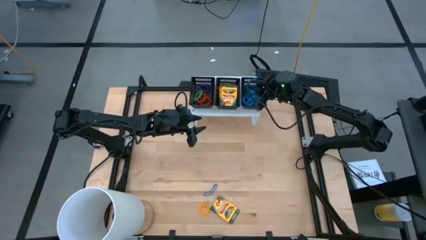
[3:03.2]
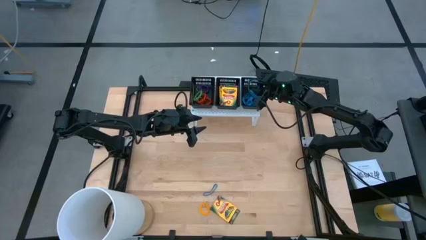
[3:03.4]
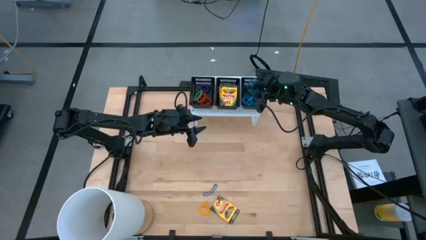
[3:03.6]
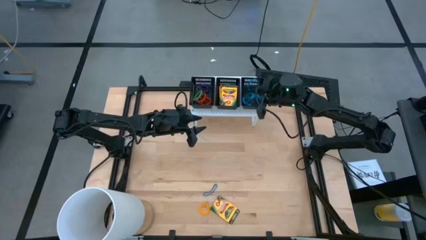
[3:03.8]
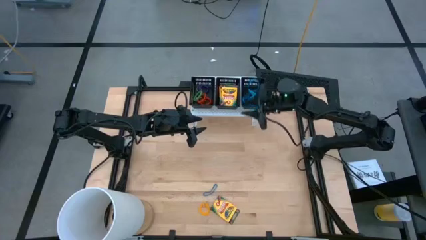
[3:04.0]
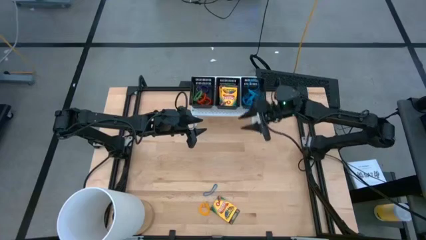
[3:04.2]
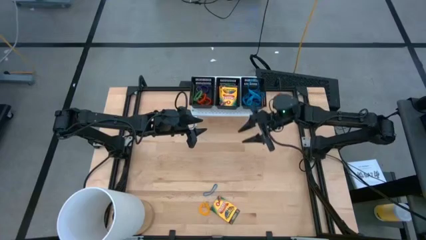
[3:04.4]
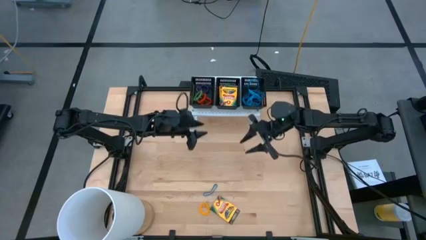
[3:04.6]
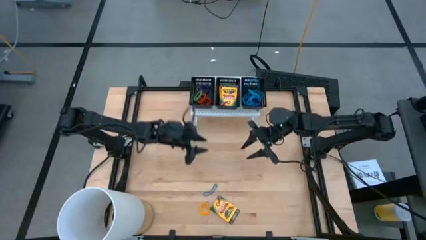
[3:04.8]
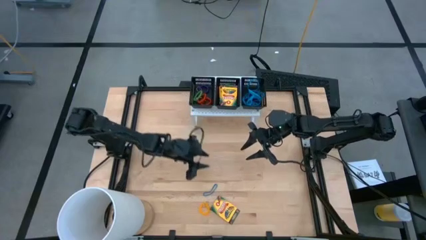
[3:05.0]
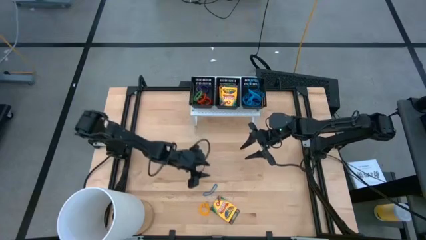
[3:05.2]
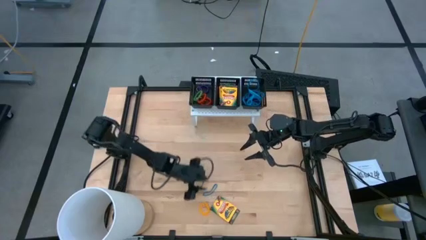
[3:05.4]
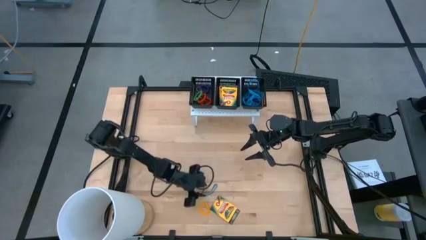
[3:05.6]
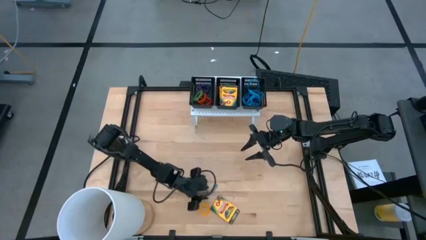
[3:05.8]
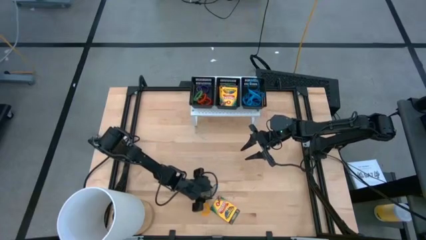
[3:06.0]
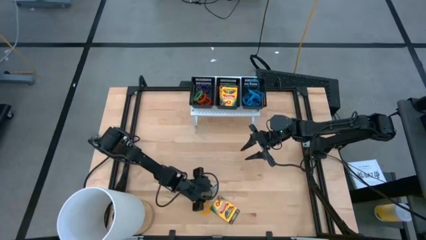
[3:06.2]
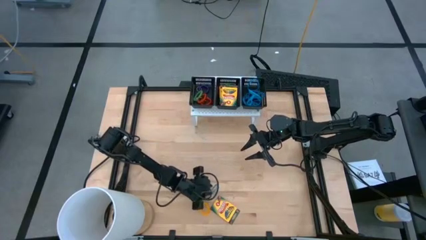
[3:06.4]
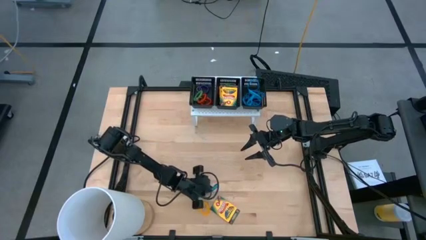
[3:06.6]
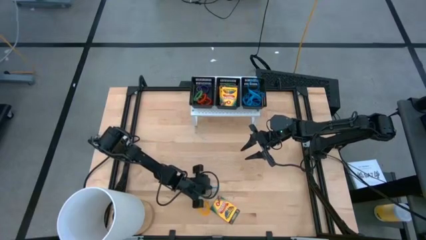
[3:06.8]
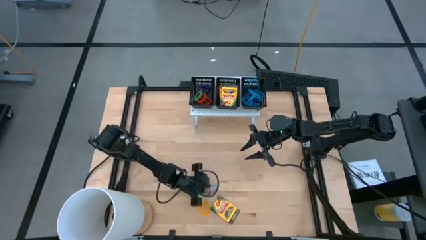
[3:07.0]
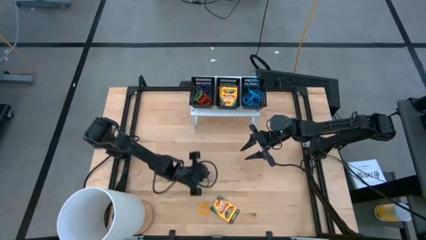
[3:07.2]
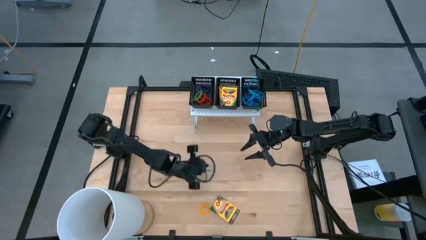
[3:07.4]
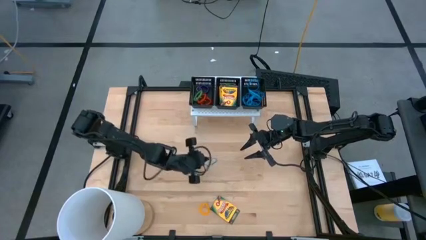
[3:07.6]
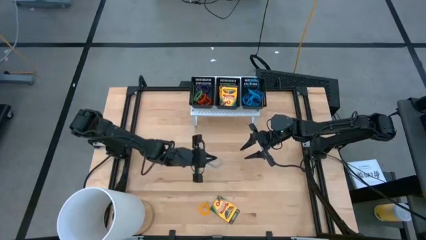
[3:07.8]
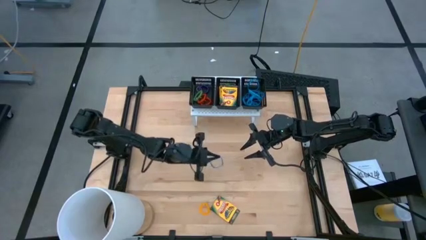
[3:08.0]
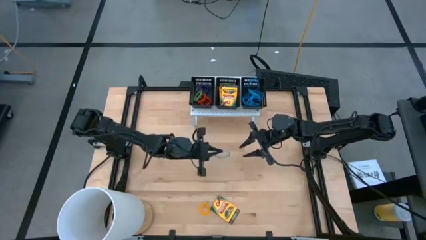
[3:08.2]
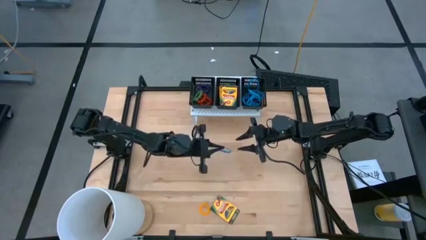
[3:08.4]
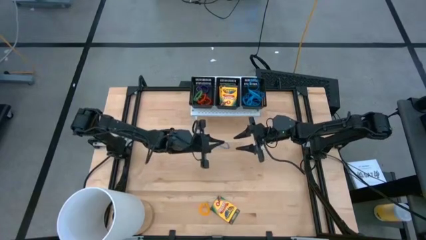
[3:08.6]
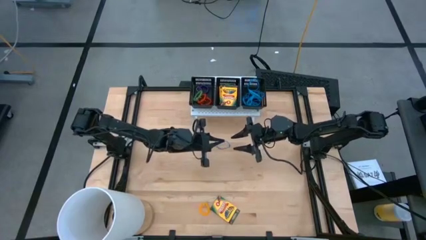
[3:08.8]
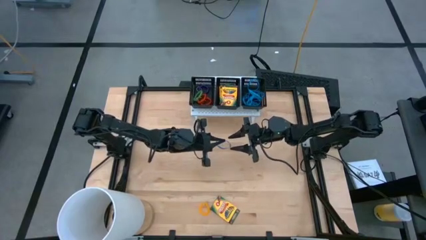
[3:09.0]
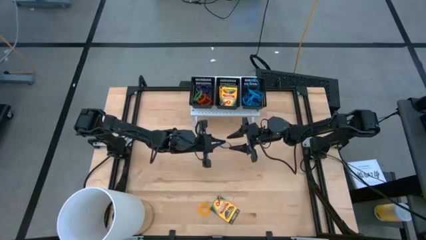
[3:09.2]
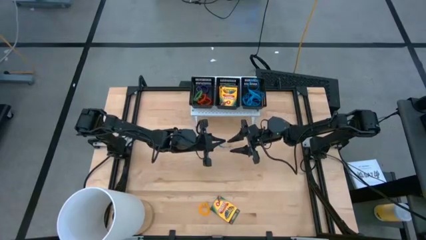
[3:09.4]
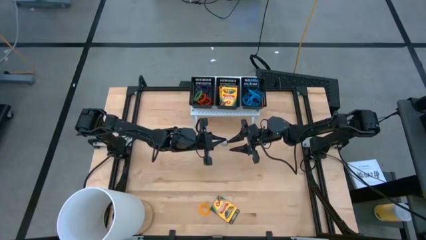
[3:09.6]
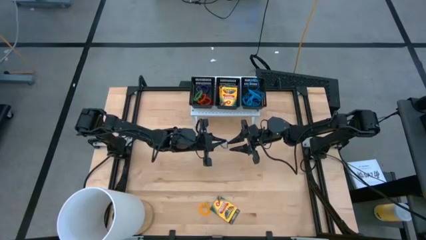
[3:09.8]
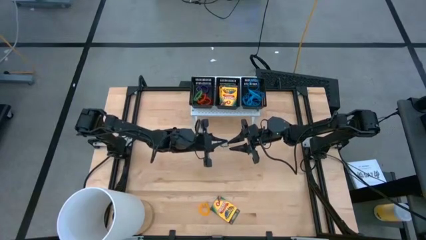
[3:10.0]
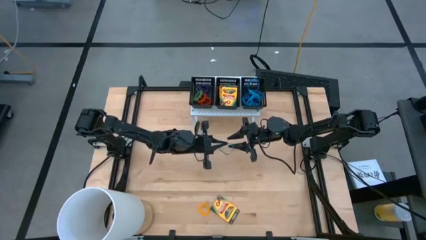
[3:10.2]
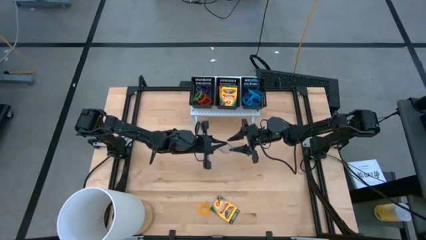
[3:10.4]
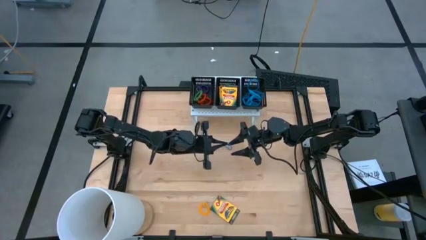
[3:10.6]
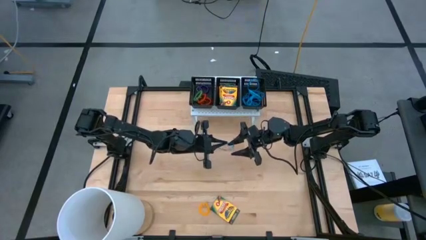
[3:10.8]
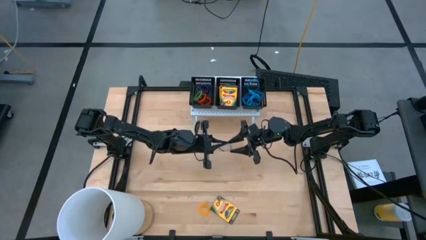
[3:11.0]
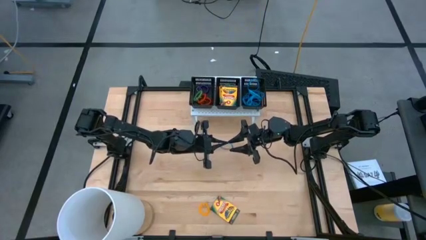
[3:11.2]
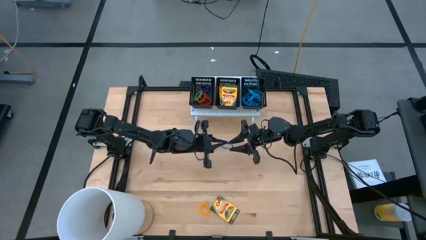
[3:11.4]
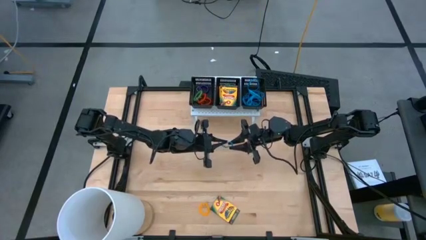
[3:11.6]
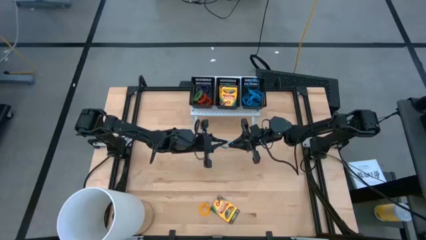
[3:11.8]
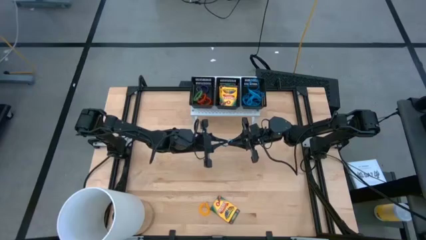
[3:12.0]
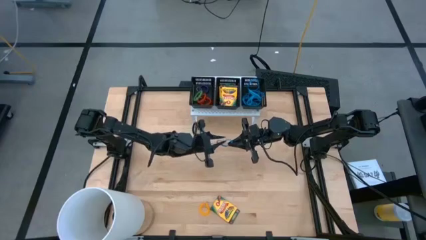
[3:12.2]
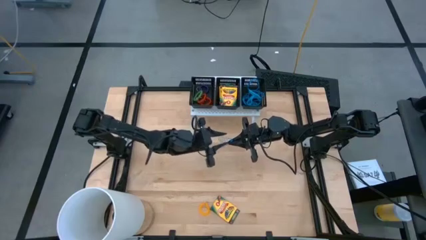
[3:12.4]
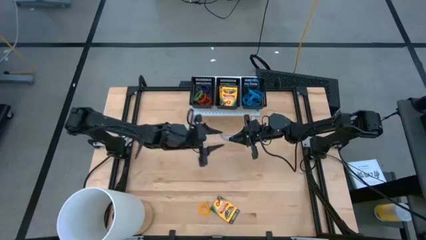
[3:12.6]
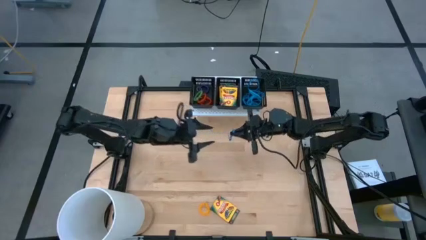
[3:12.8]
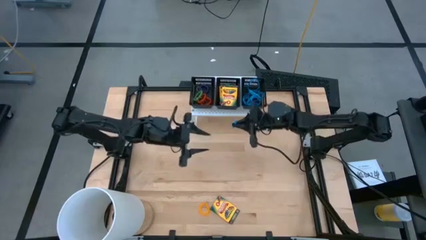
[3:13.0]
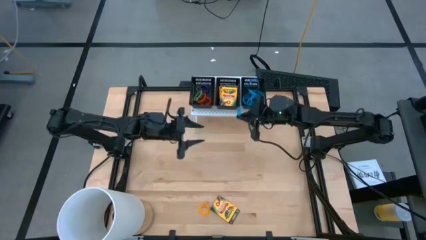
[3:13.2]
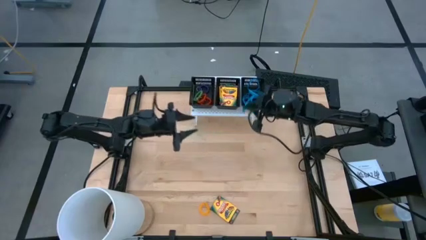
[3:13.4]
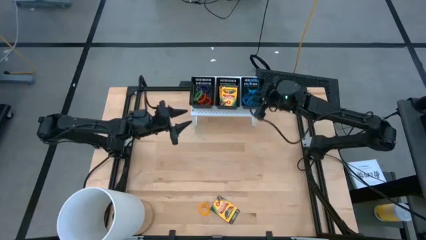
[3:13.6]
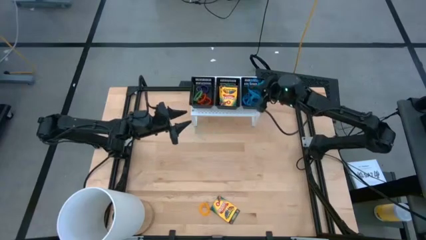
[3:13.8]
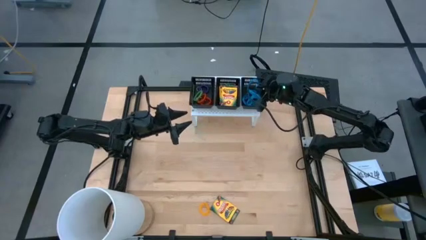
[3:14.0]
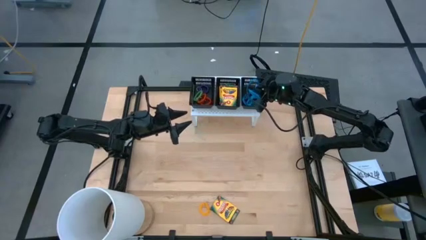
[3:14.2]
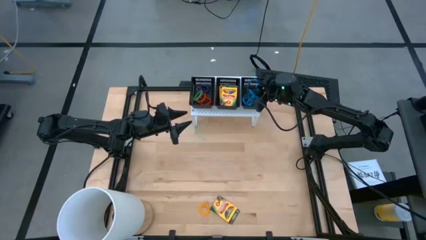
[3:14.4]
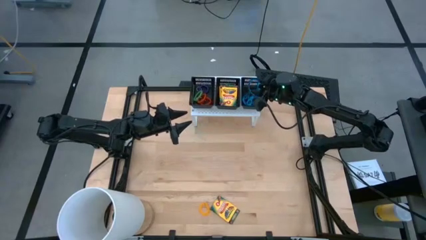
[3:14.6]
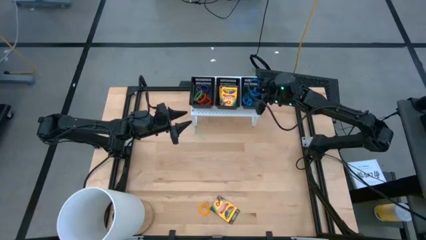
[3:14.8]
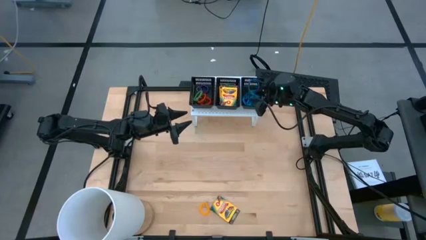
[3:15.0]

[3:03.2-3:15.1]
Task: Pick & Place Office Desk Supplies
Put the blue rubber band into the right black bin on the shelf

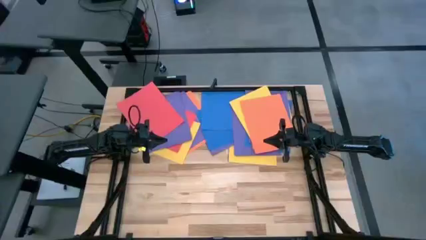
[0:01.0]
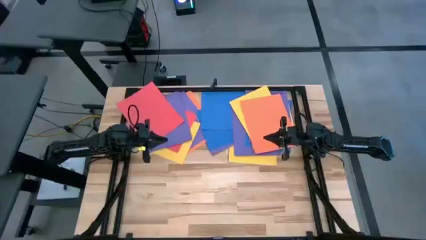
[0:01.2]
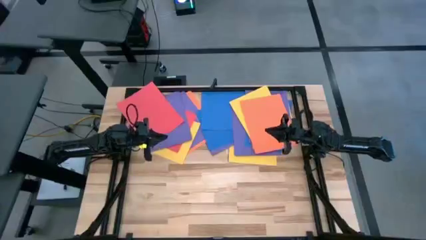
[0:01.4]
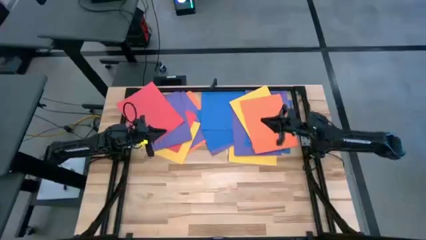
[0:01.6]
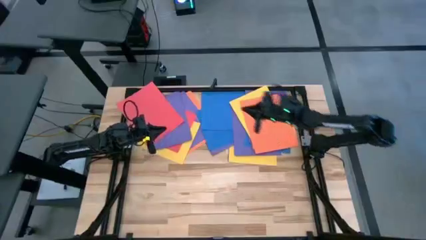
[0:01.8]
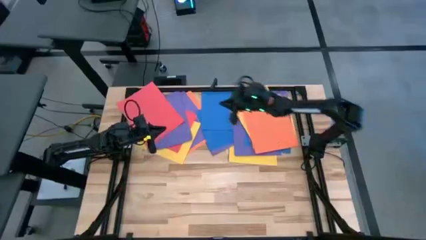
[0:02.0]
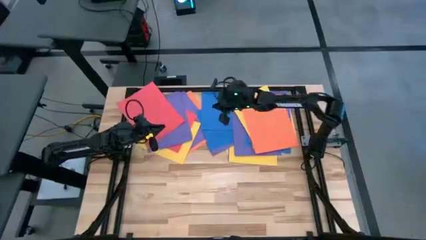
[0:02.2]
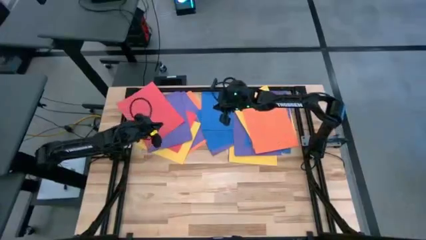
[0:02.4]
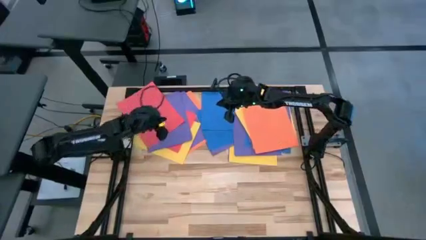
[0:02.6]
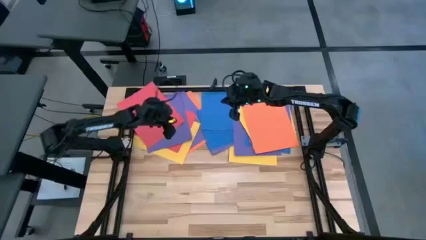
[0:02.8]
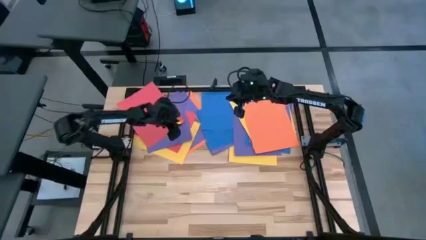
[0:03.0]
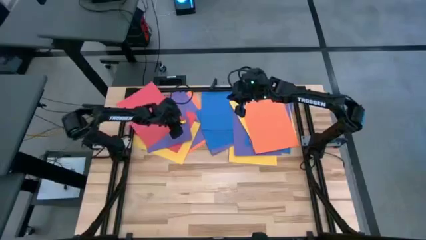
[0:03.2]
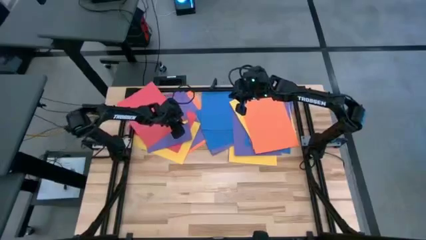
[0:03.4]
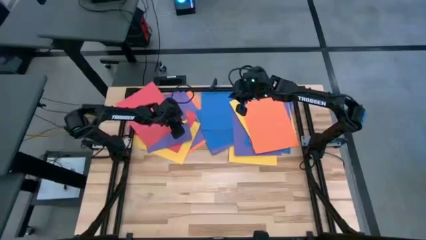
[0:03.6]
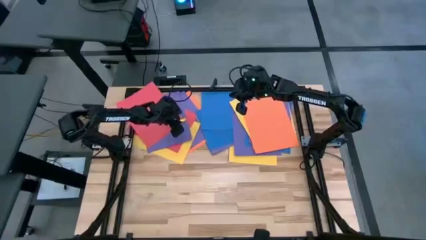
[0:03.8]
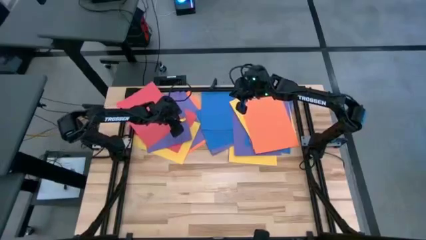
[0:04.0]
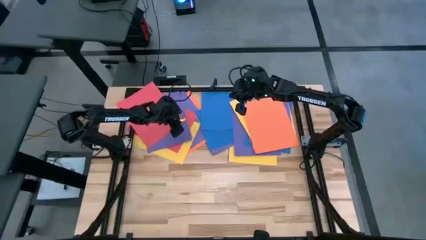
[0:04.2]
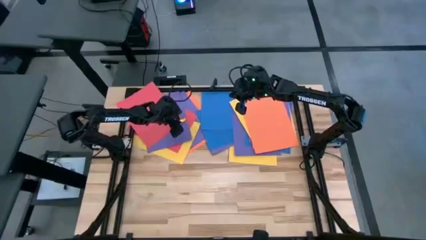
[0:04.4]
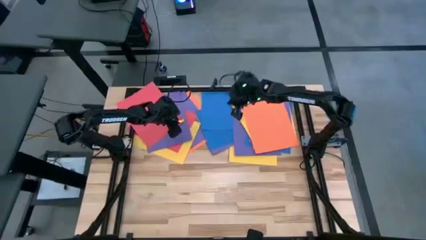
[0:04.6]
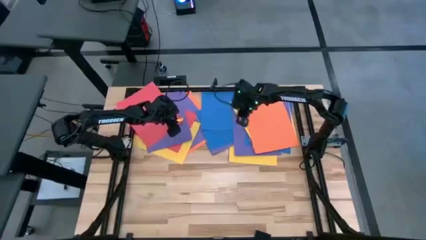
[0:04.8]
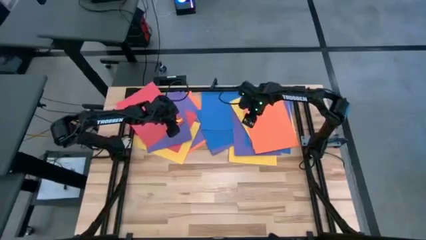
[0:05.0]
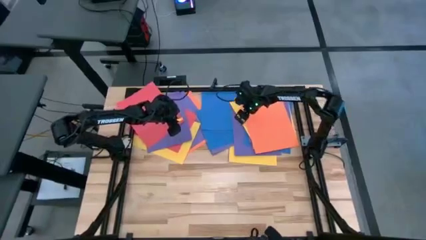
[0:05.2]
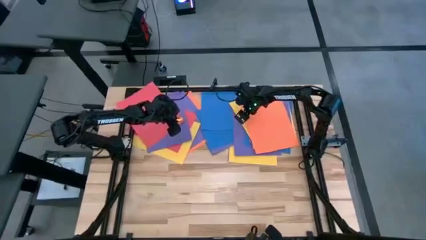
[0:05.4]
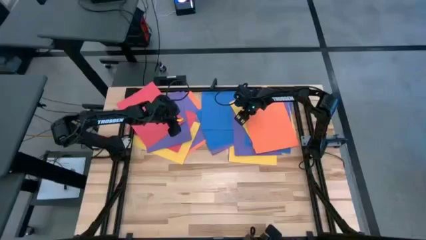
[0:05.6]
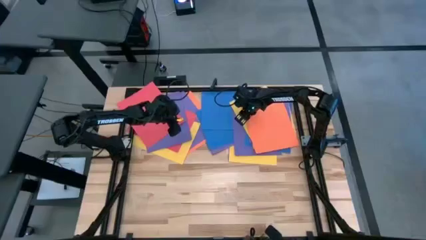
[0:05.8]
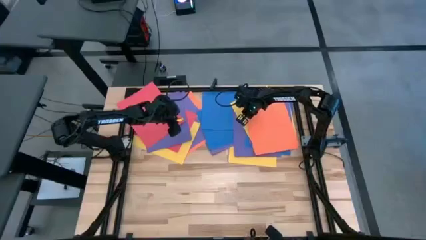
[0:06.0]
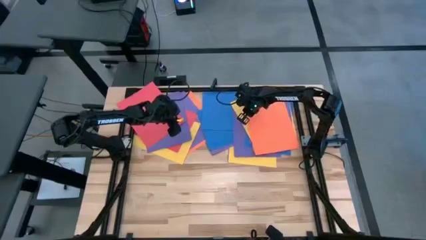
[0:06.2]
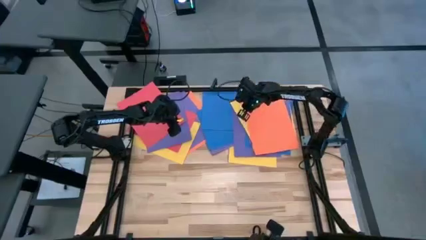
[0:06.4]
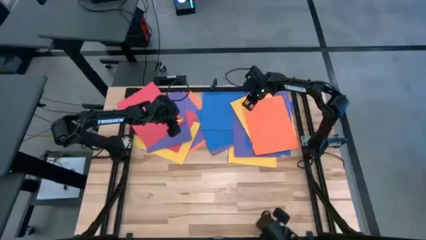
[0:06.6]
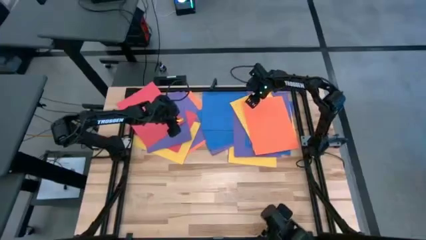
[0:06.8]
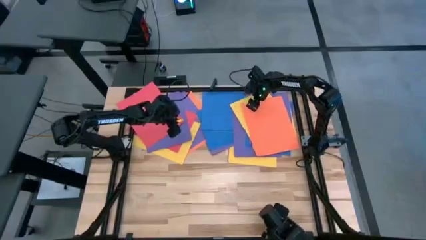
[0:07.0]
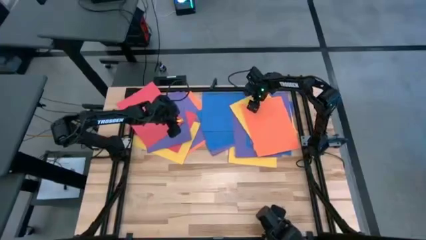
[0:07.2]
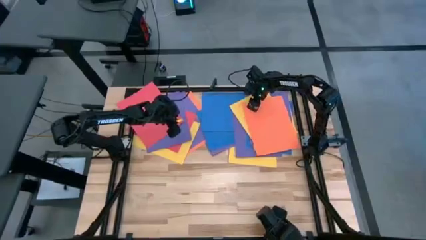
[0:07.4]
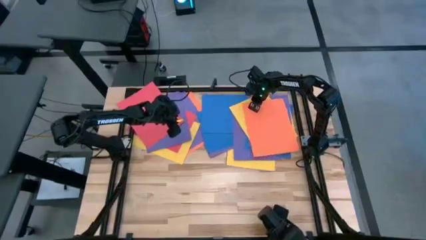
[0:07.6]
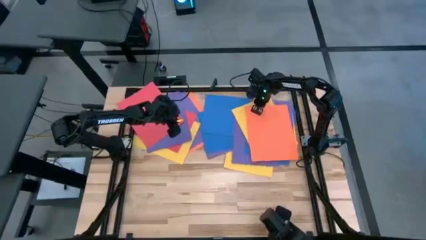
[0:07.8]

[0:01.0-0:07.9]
Task: Organize paper
Put the orange paper to the bottom right of the table
